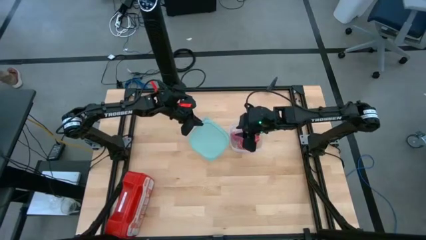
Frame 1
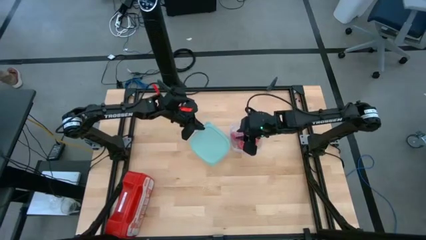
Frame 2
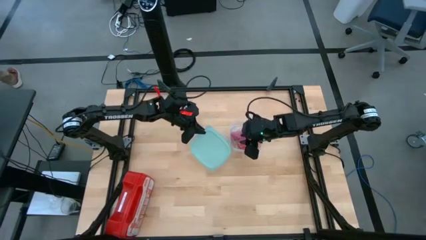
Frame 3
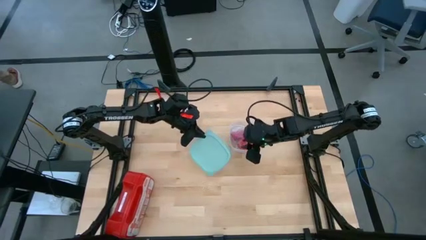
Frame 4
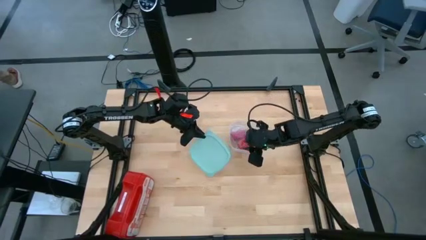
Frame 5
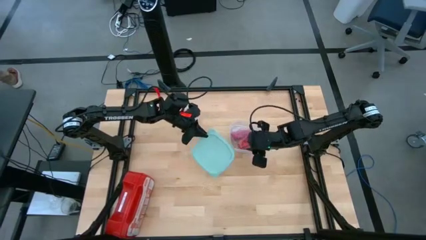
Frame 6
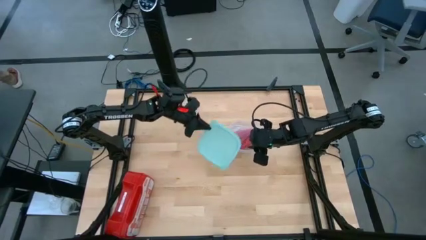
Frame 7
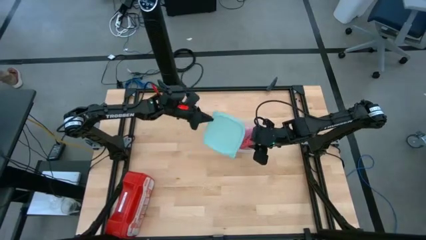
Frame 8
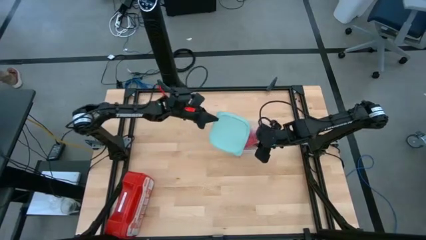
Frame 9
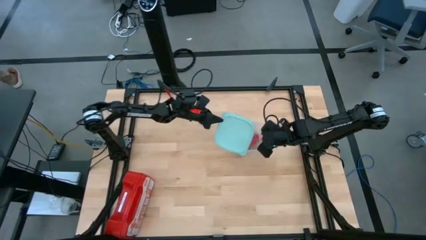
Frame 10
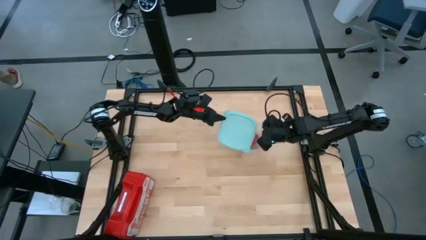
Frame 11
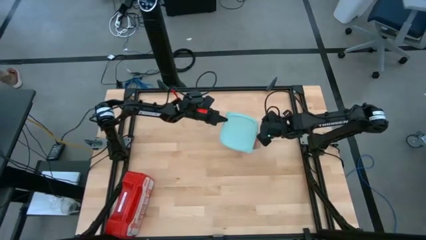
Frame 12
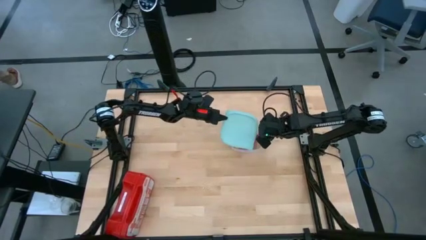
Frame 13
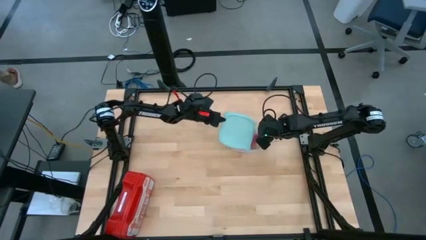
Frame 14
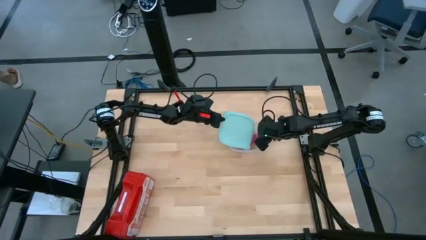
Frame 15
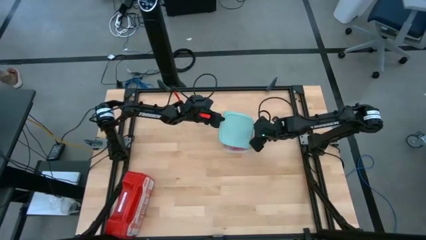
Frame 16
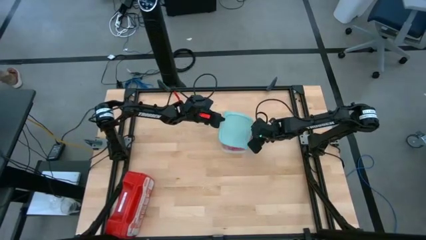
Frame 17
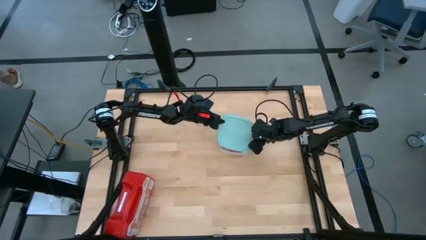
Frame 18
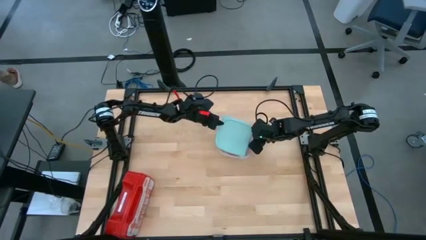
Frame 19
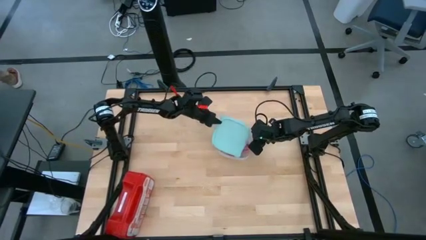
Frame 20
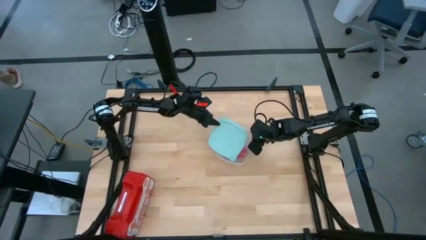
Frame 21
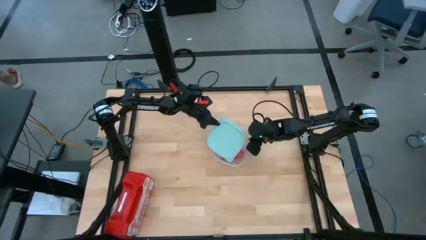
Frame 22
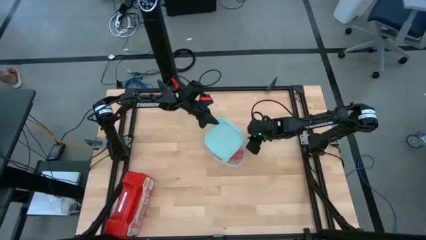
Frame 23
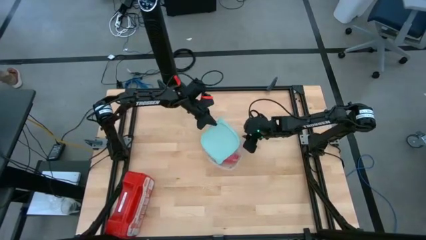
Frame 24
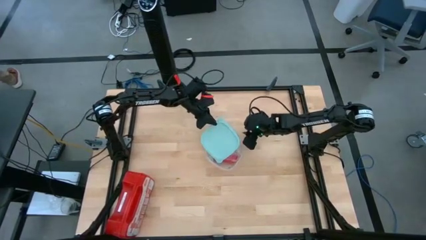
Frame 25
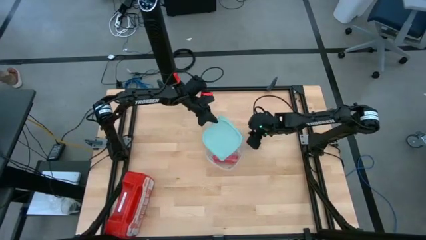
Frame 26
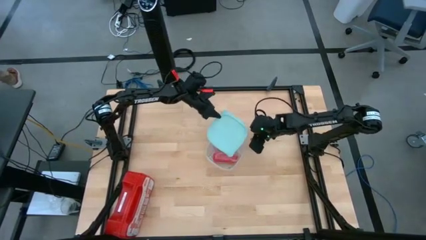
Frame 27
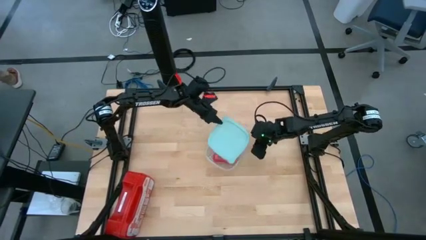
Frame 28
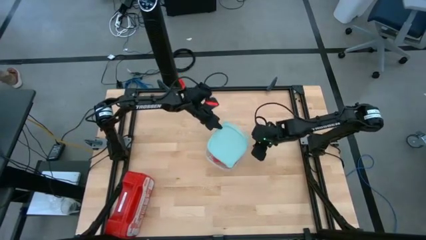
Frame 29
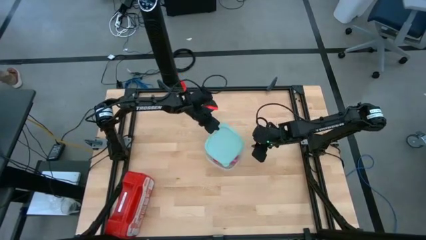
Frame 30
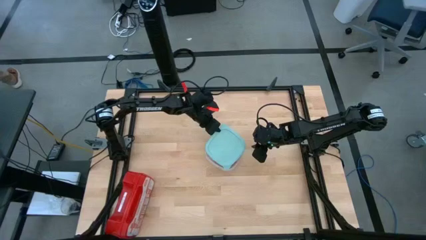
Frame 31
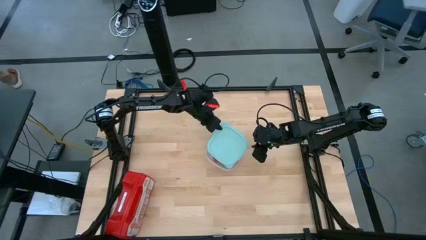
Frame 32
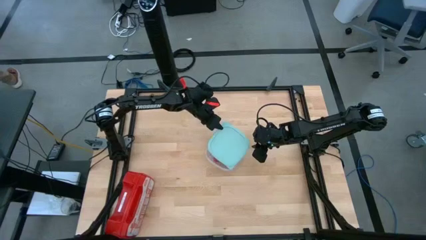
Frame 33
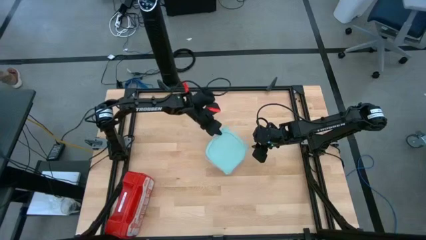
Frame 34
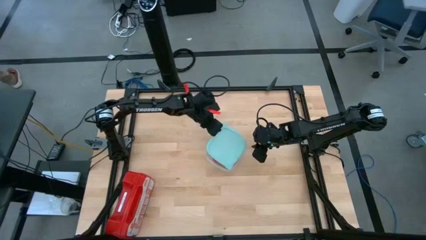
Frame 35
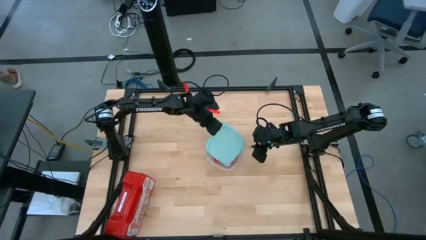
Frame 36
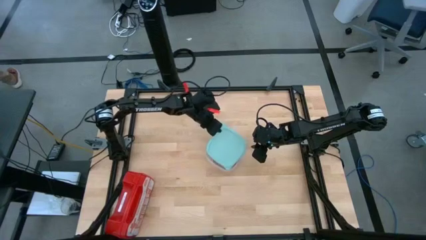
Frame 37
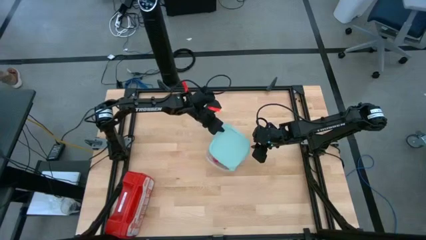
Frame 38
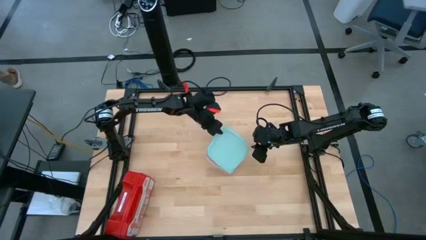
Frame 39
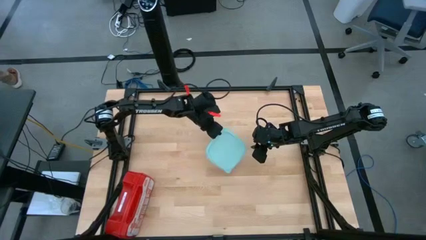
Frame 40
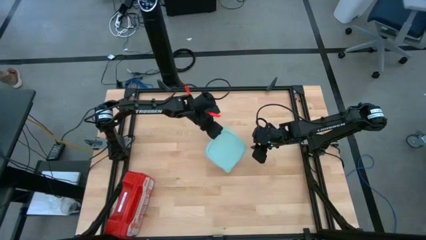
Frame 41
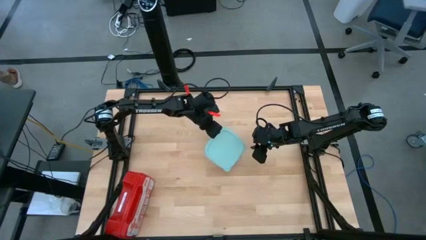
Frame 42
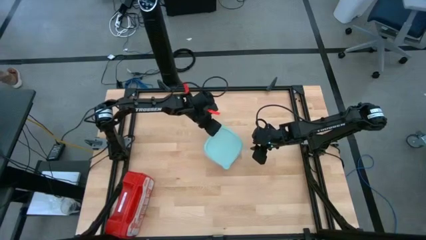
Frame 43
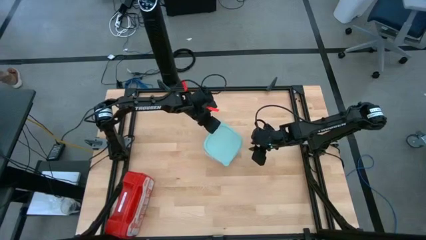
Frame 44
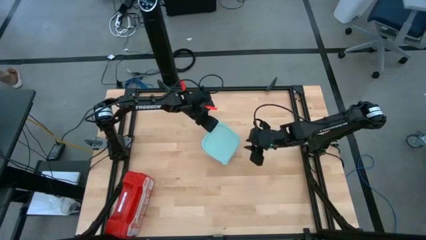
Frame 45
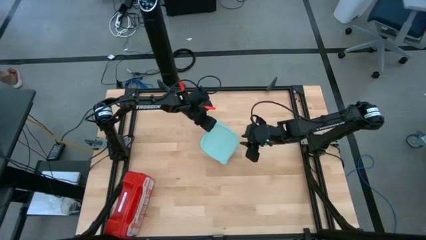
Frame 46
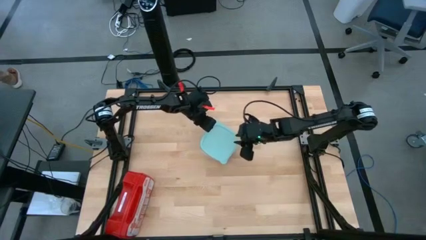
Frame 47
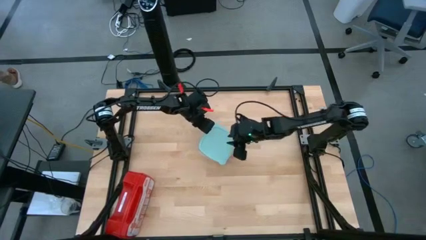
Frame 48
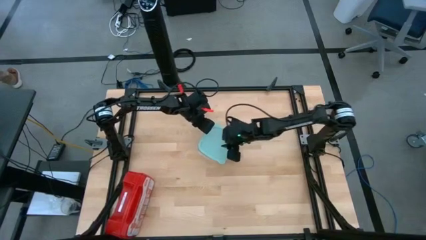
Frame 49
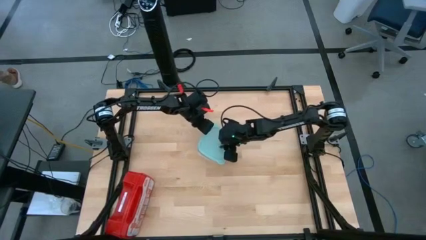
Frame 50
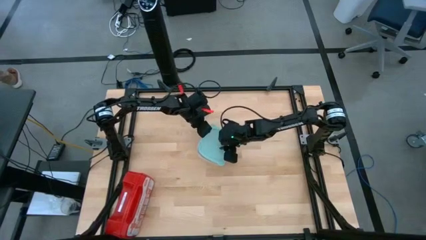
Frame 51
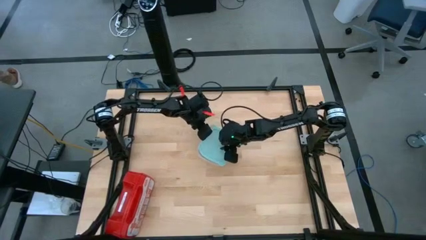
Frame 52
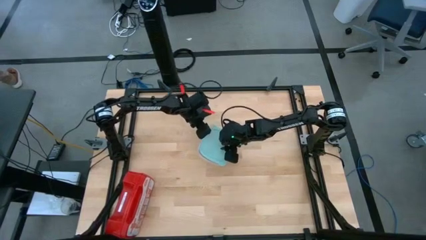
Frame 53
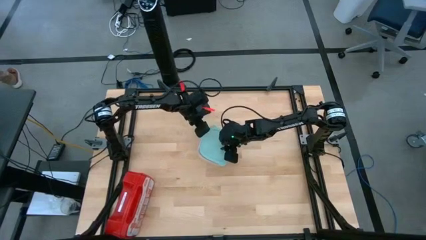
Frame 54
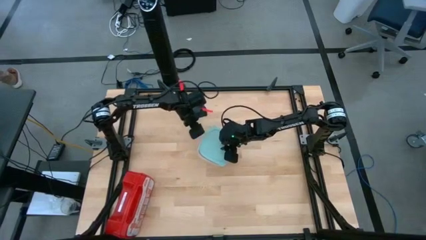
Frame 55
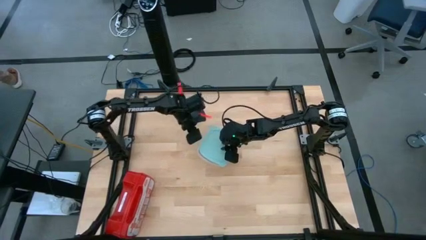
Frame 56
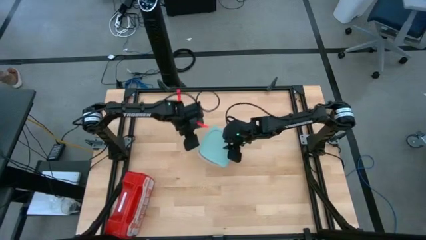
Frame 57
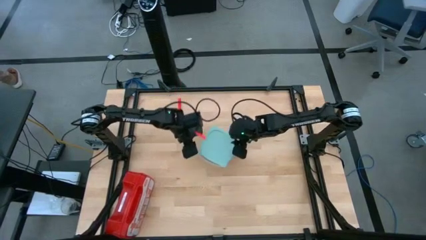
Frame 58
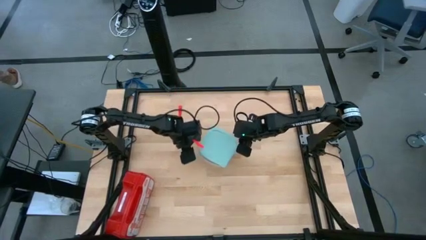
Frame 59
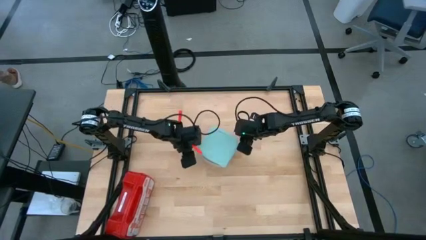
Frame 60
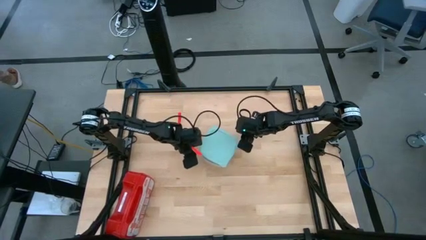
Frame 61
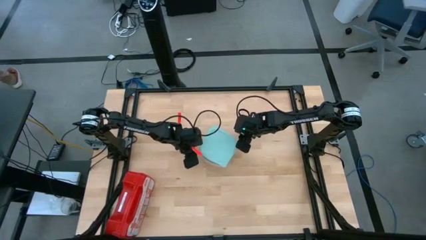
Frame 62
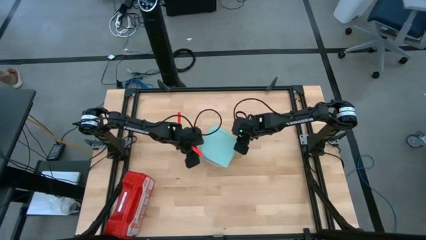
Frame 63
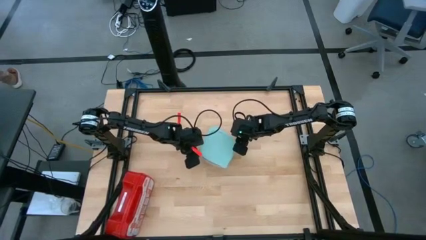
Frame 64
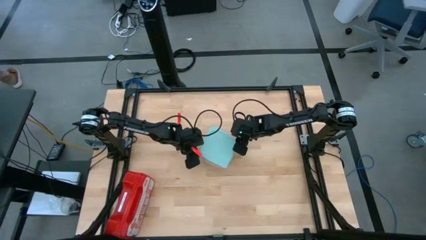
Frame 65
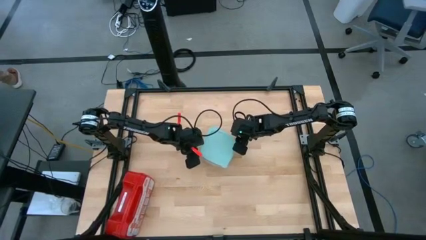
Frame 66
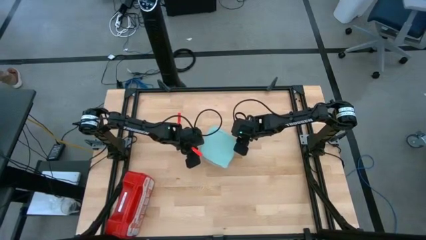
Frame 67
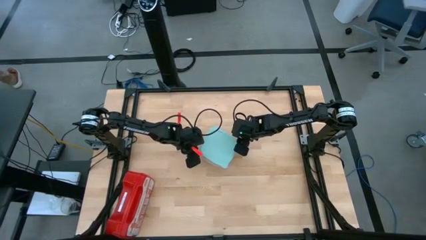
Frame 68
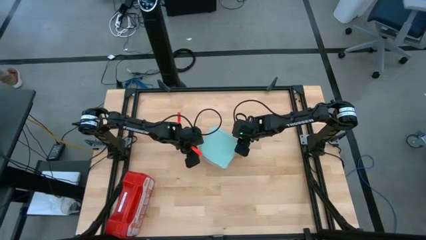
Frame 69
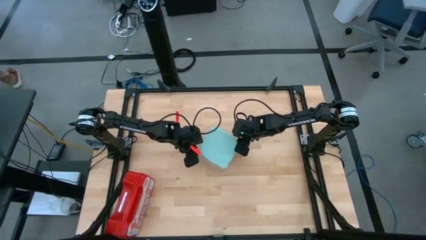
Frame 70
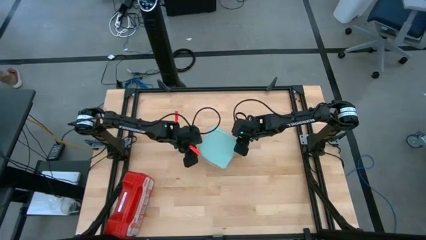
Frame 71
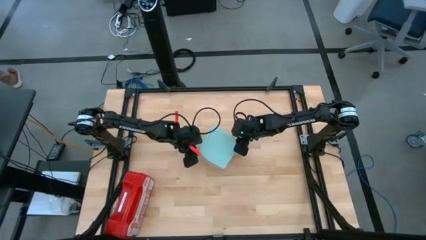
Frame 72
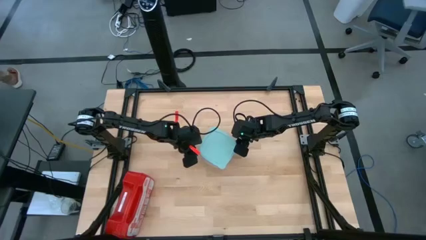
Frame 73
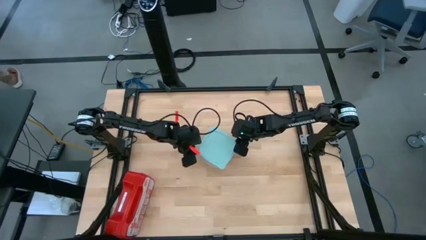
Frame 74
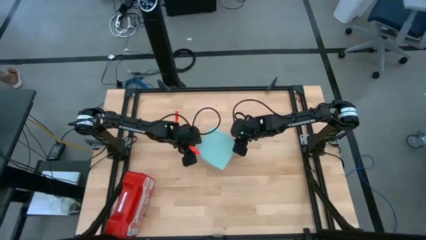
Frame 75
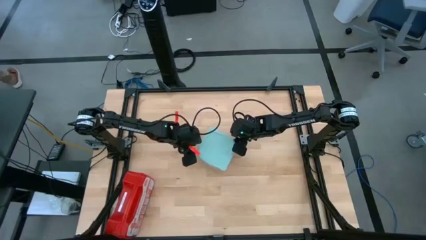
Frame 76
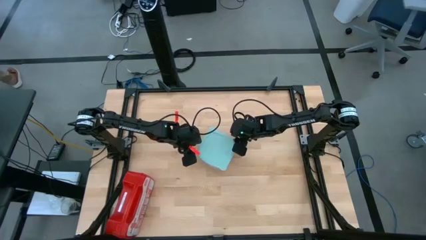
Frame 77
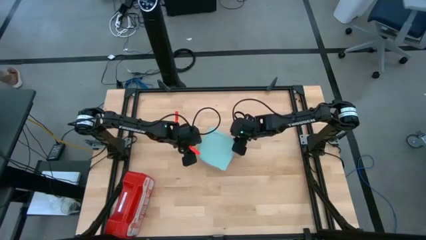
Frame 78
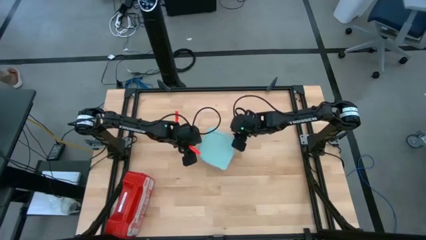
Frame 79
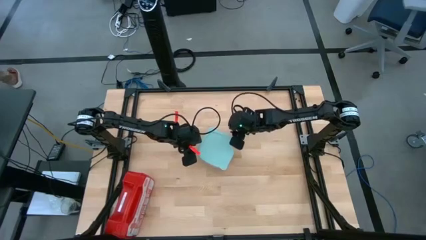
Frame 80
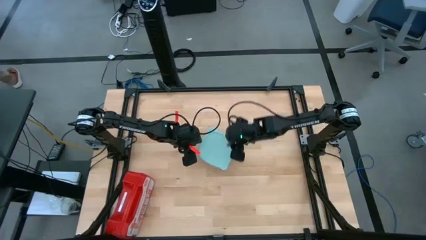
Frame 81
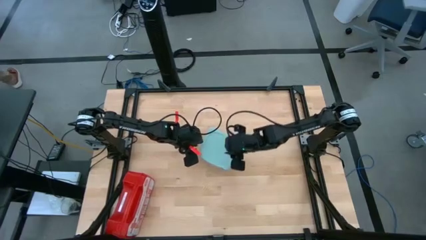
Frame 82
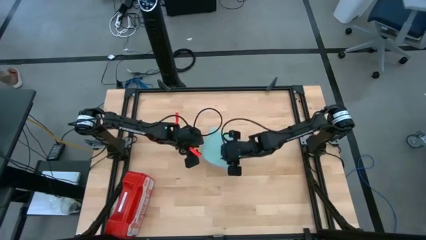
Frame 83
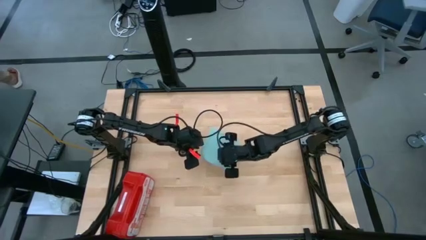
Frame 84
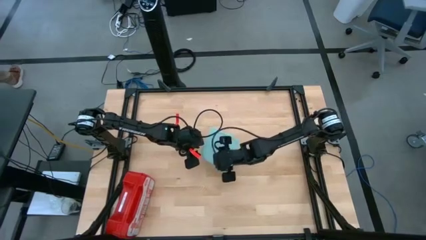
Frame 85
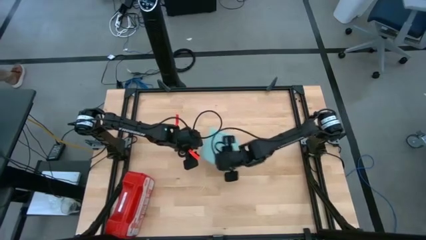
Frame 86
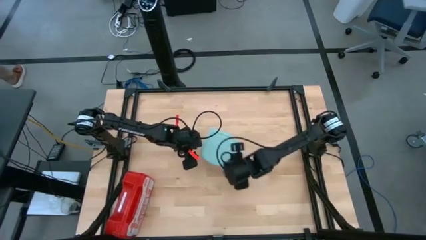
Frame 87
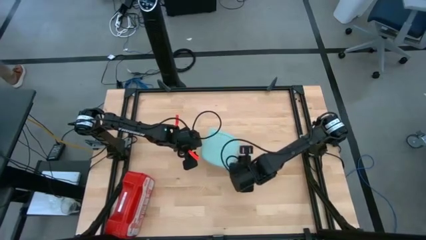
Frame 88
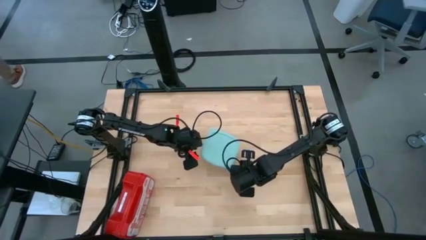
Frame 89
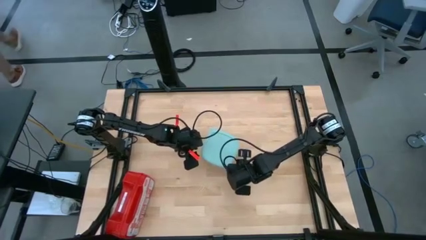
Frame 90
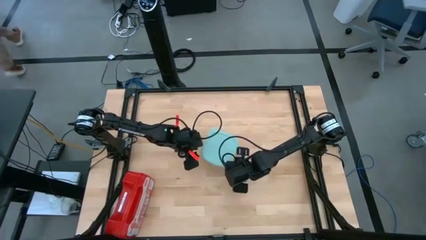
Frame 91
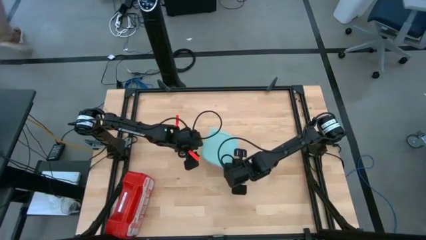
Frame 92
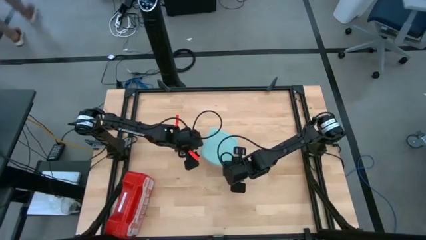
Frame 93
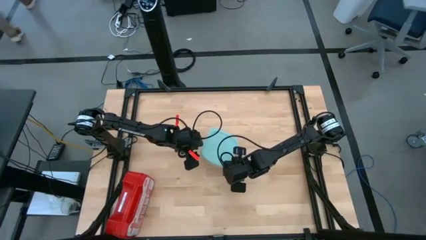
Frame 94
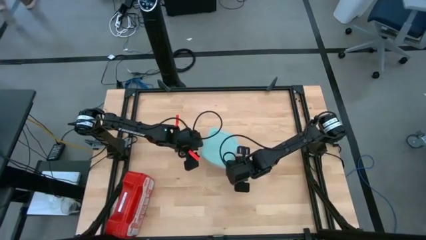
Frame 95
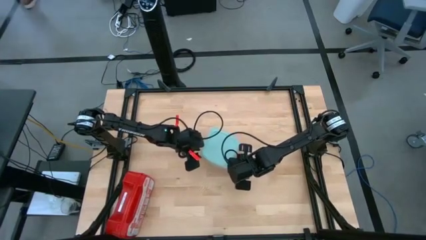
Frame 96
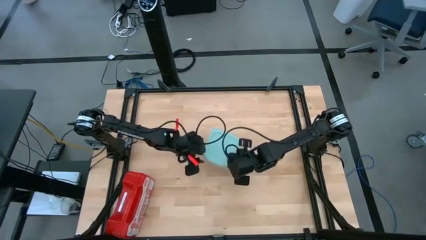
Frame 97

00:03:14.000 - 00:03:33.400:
Task: Roll bandage
Close the green tupperware
